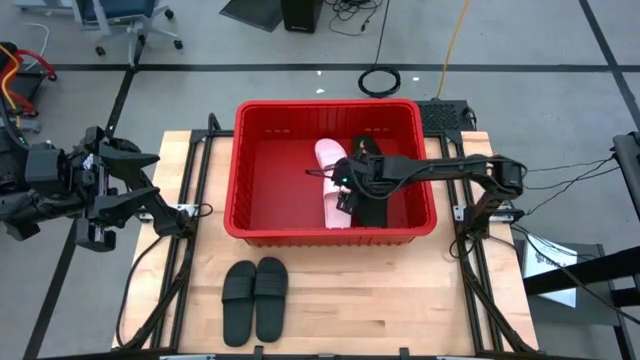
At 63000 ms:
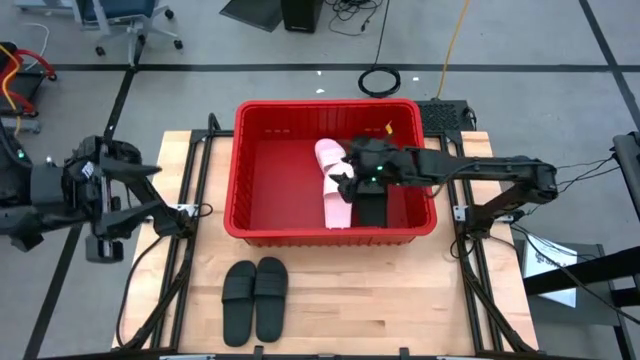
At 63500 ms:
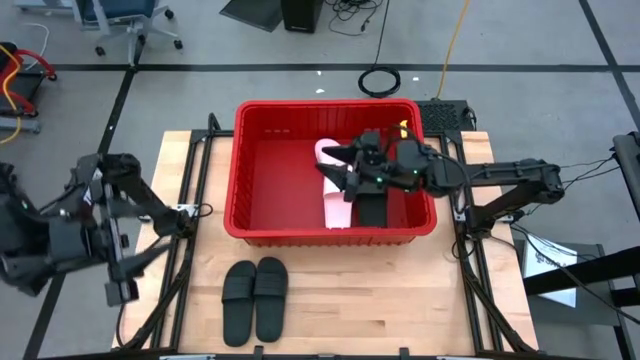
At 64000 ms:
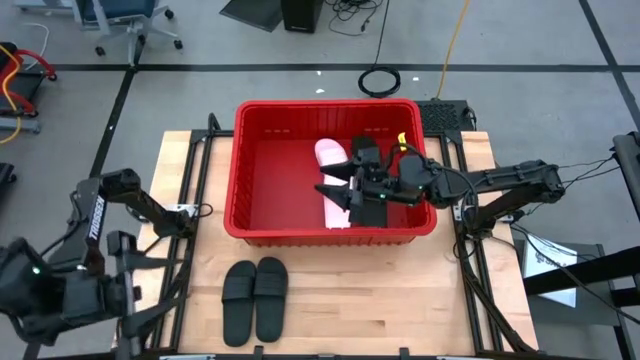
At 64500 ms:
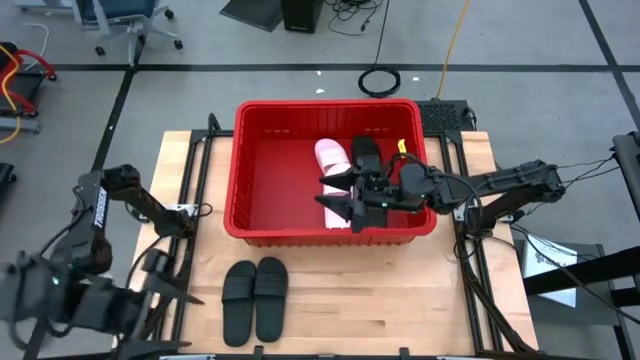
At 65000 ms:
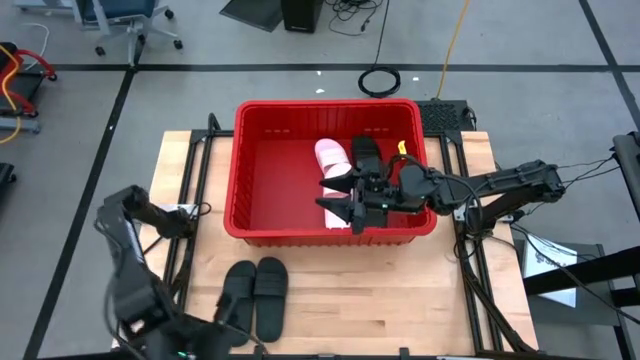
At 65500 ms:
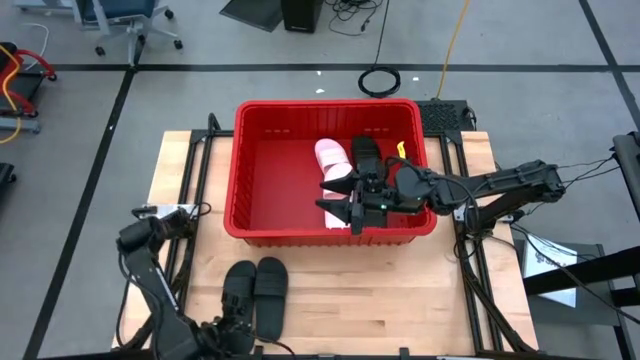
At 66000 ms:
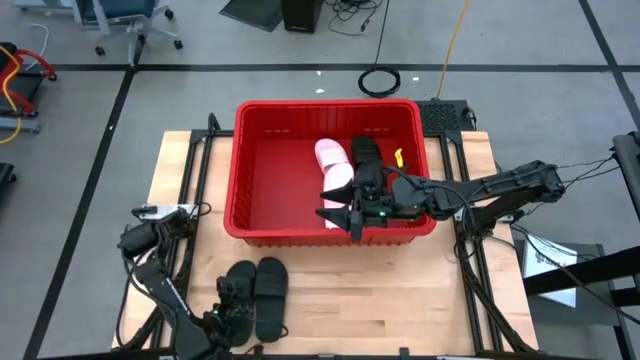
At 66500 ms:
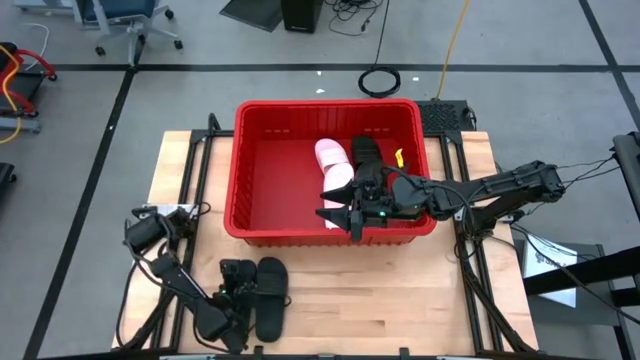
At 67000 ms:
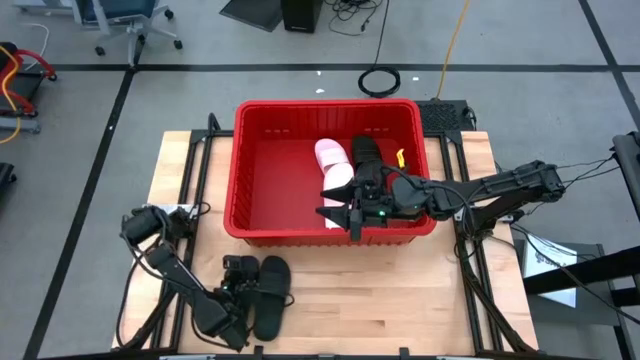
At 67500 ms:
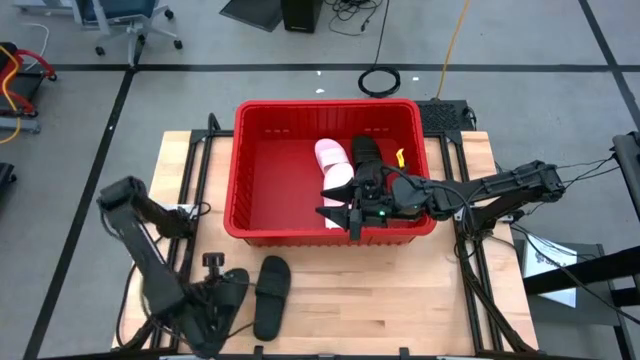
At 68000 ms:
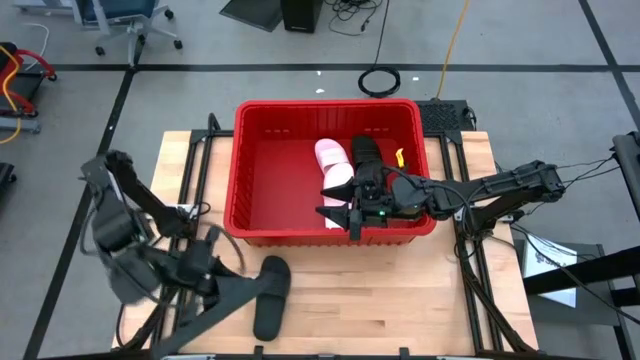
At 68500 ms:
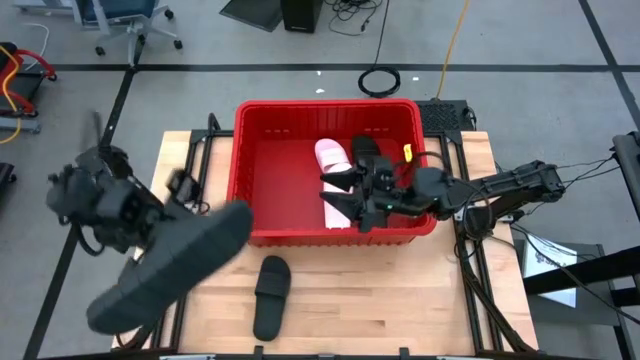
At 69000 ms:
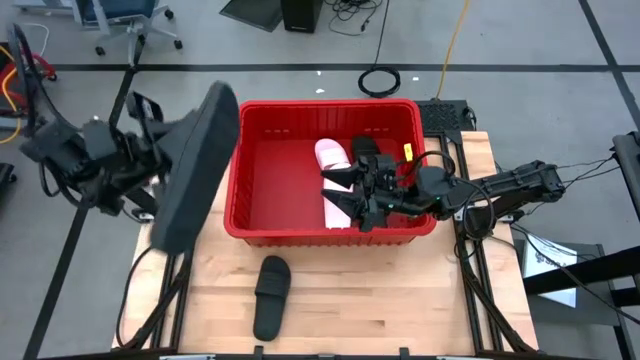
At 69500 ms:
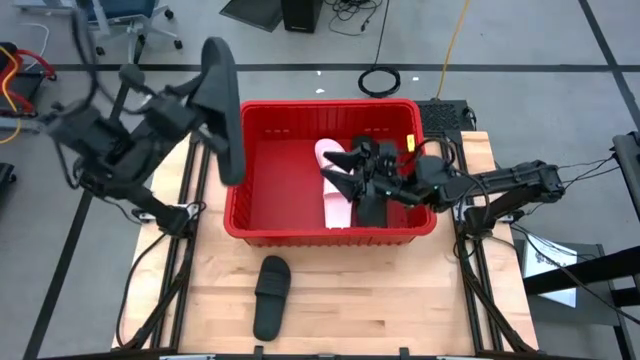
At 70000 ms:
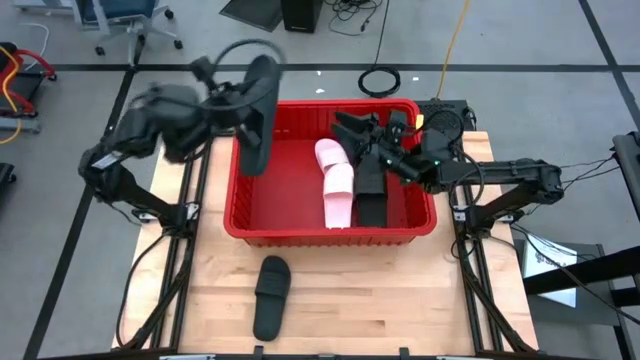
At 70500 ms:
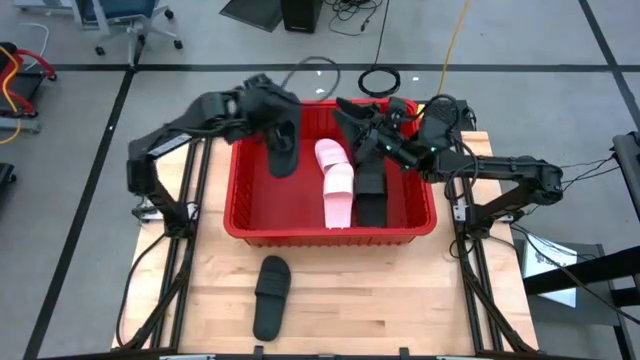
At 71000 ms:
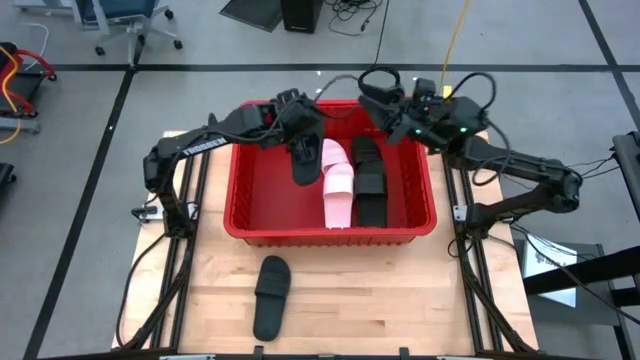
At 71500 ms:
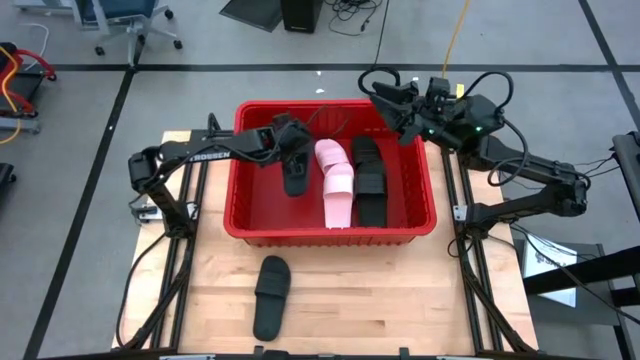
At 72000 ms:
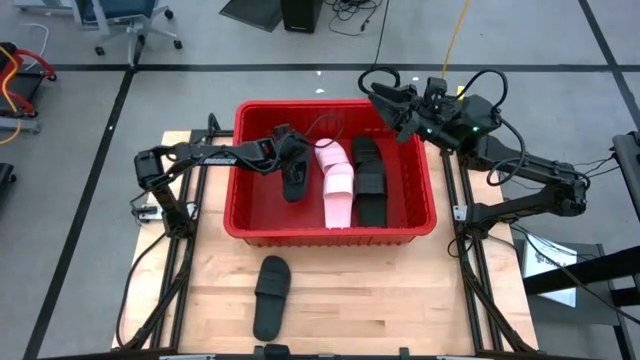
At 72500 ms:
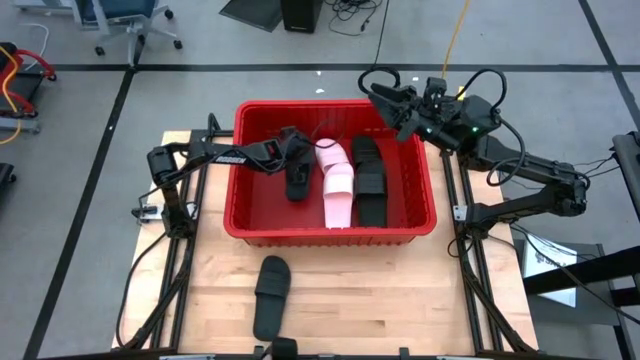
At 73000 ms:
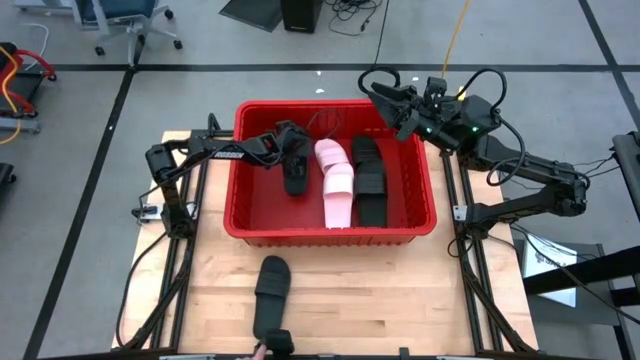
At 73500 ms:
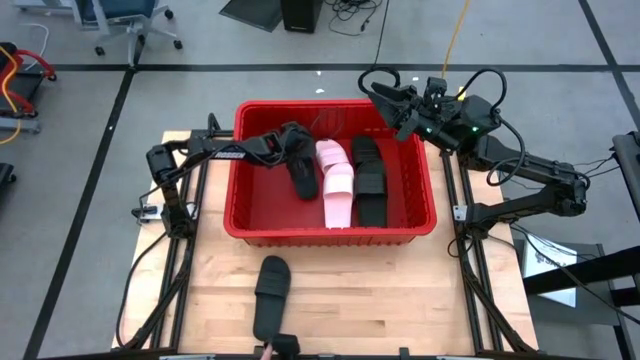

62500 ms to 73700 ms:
Task: Pick and place slides into bin
Put the black slipper into the red container

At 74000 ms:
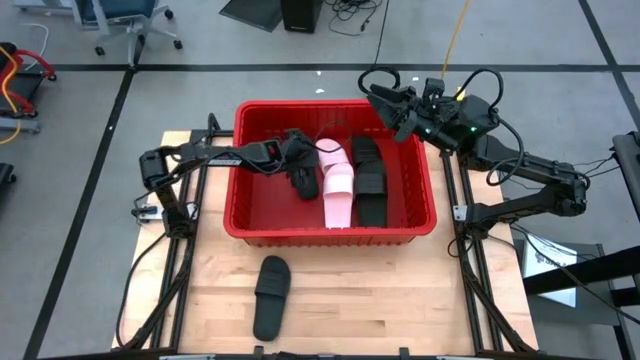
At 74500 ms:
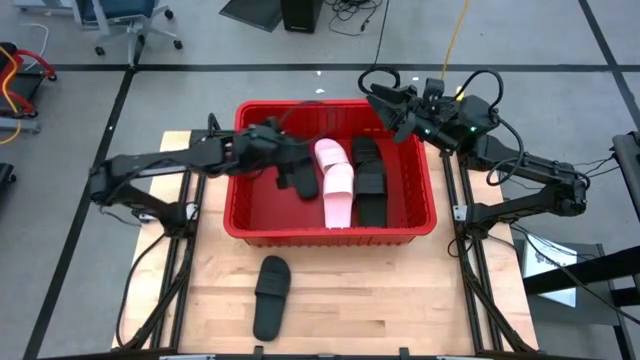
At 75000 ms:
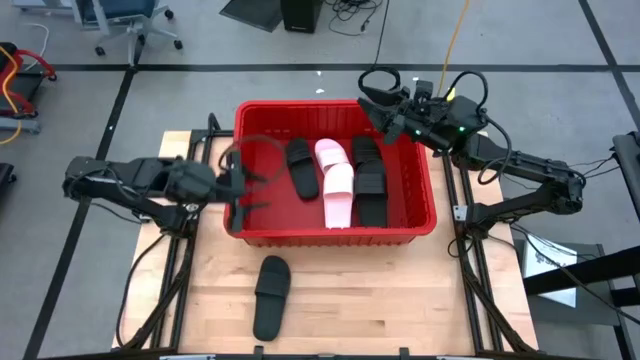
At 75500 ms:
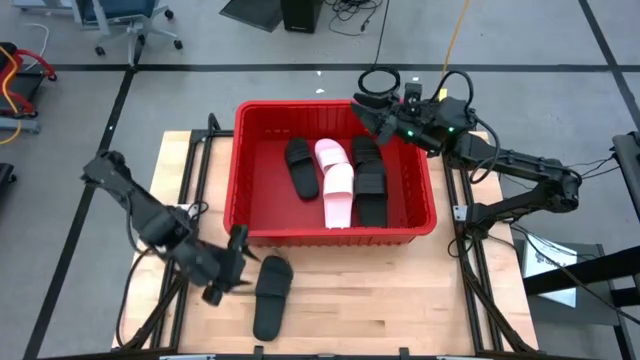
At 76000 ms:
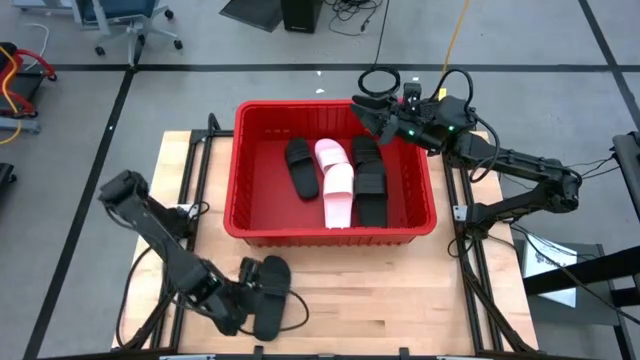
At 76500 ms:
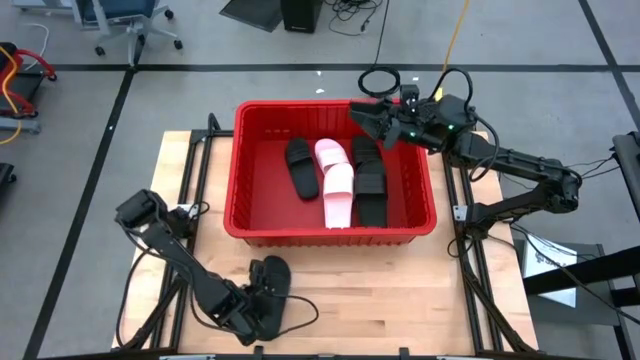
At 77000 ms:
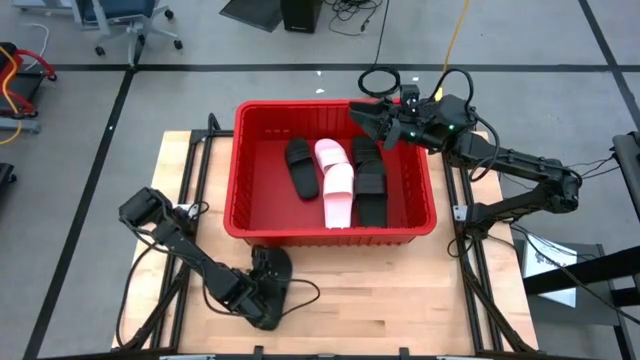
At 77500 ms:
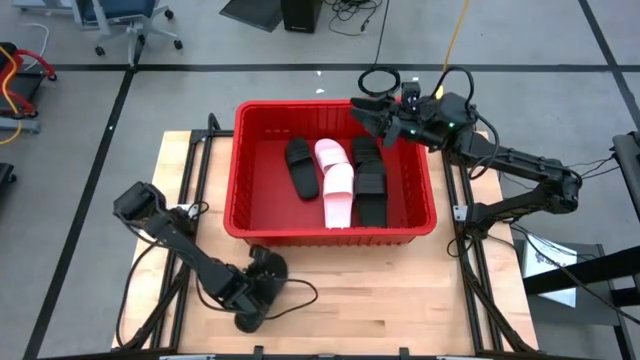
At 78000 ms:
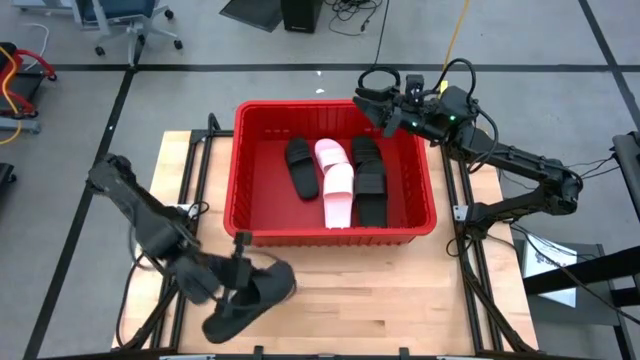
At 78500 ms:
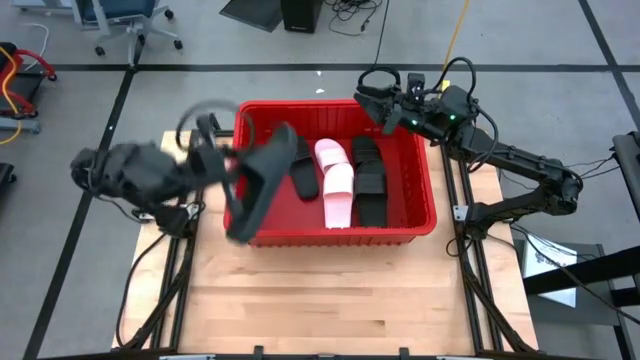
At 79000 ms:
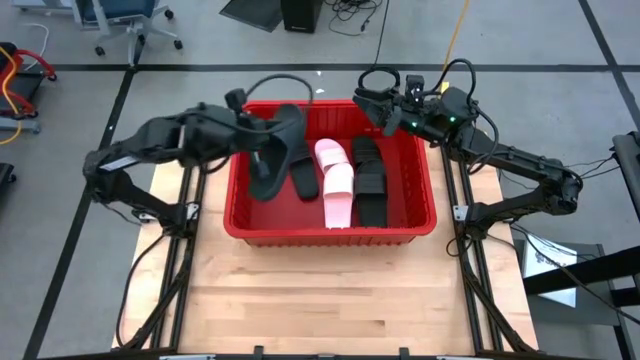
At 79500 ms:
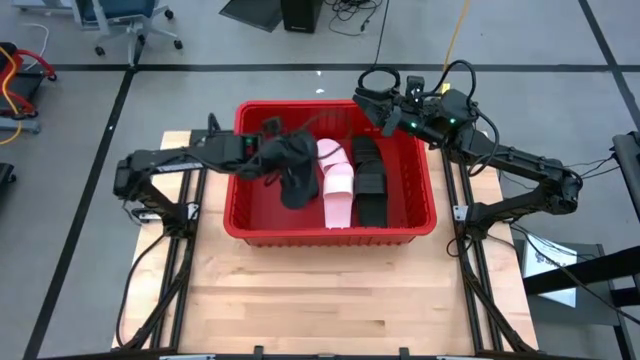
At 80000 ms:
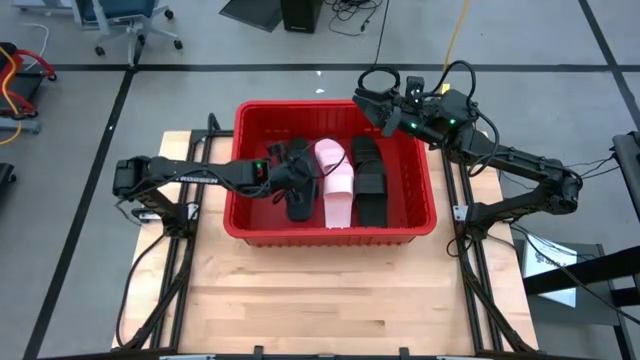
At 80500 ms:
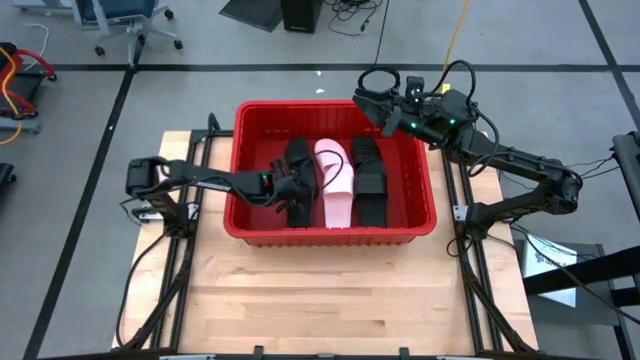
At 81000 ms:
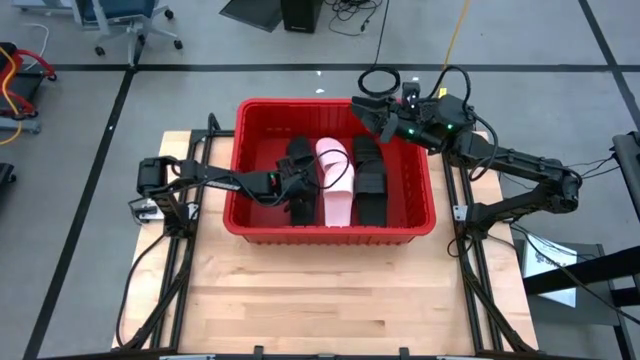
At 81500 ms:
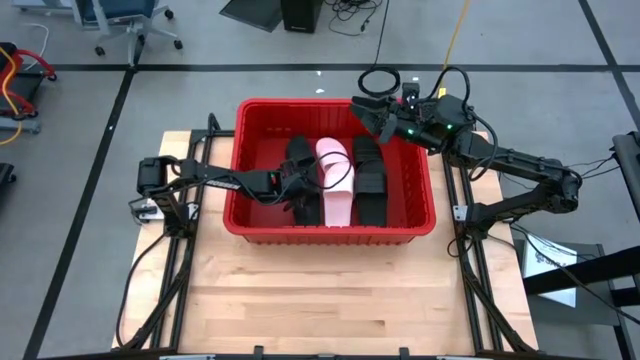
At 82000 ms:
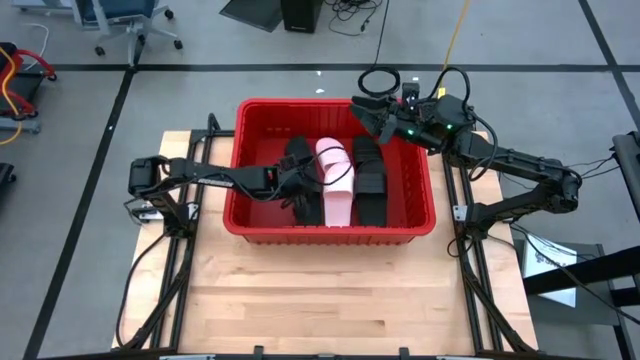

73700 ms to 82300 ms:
Put the black slipper into the red container

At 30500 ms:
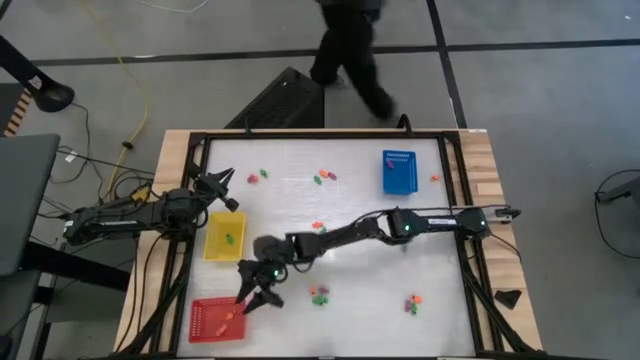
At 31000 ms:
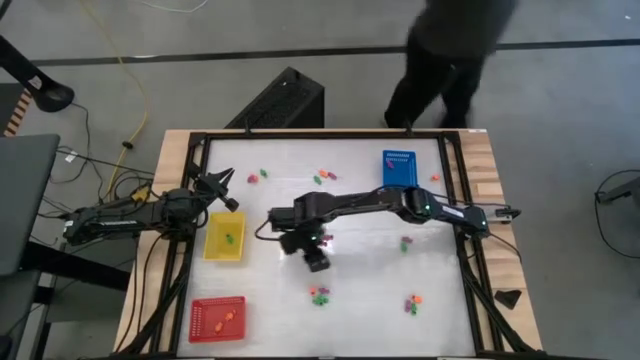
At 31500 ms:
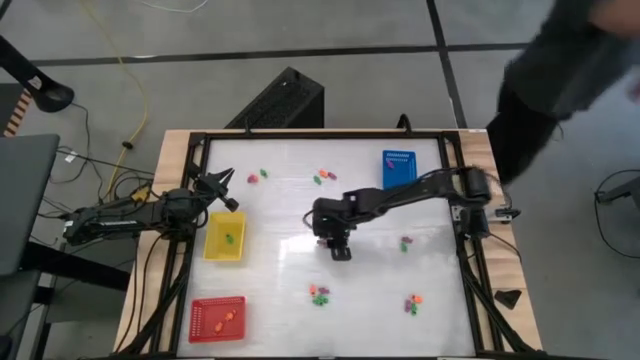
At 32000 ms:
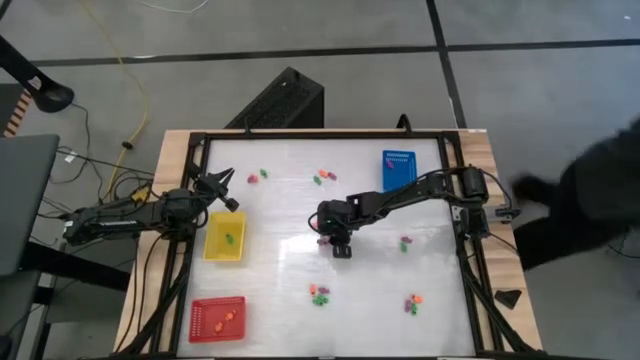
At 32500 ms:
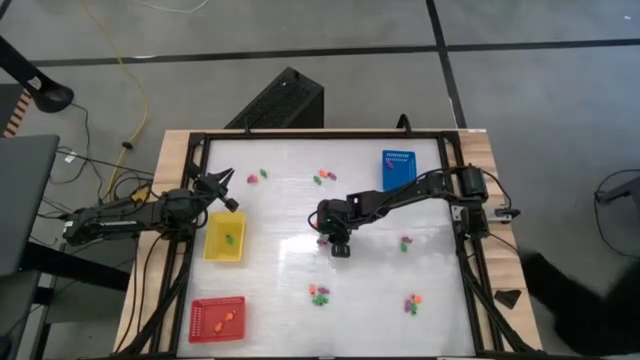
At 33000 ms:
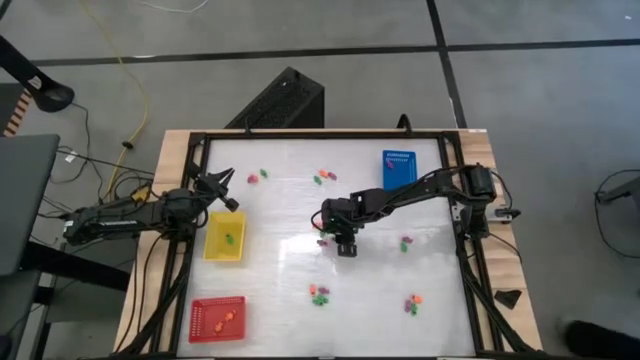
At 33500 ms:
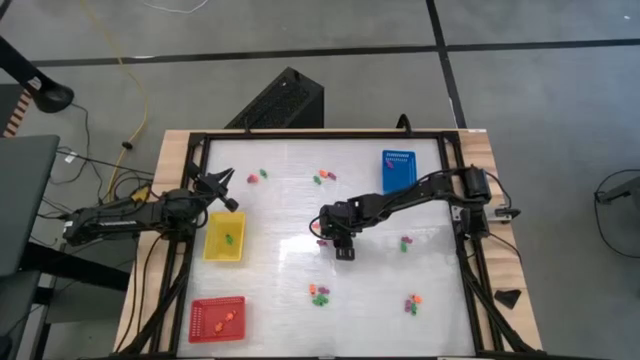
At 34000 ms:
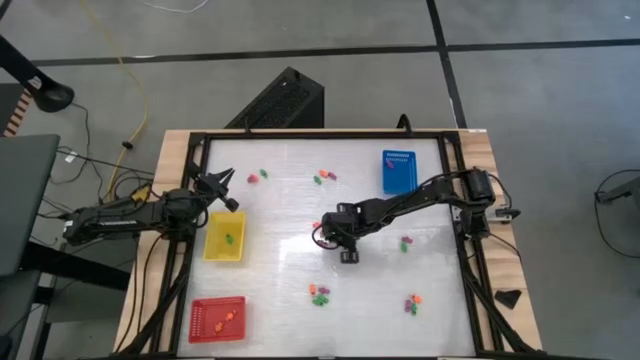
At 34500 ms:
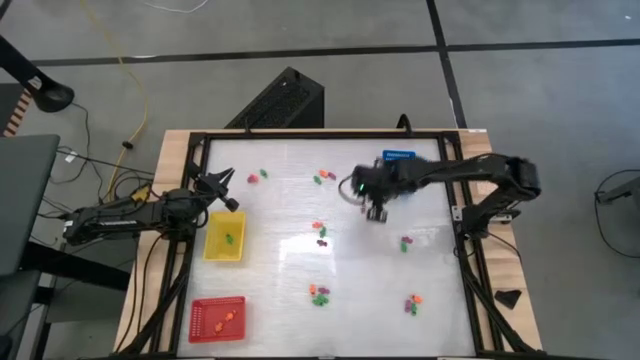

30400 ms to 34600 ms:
Task: Sort Halloween decoration
Put the purple skeleton toy into the blue bin
